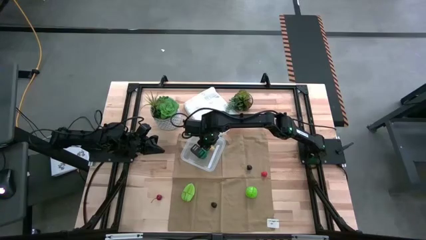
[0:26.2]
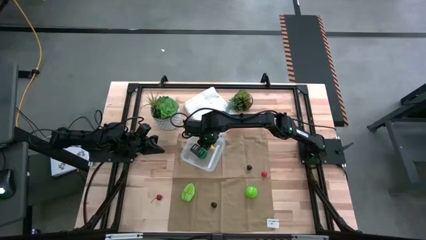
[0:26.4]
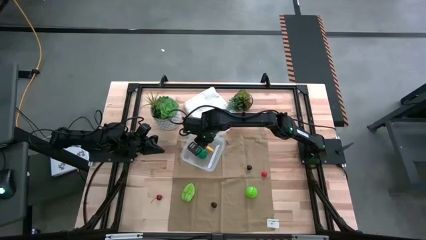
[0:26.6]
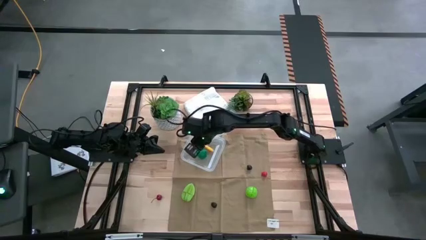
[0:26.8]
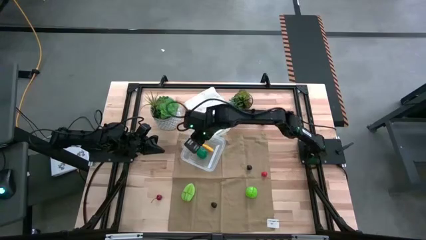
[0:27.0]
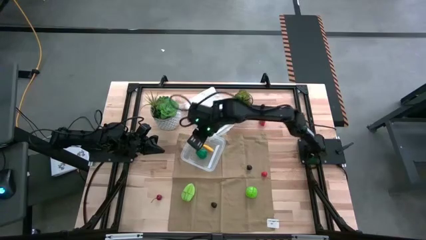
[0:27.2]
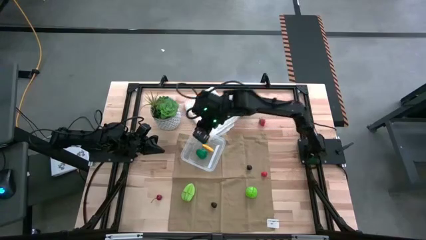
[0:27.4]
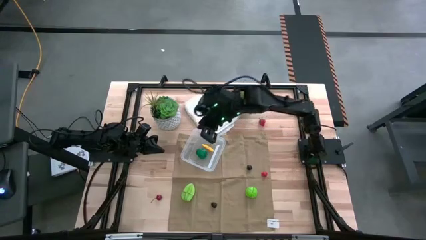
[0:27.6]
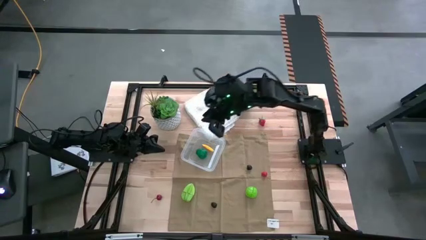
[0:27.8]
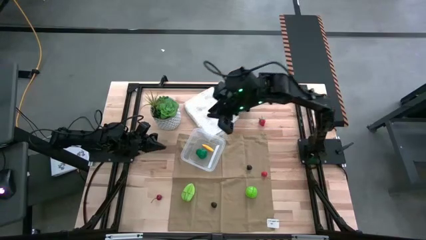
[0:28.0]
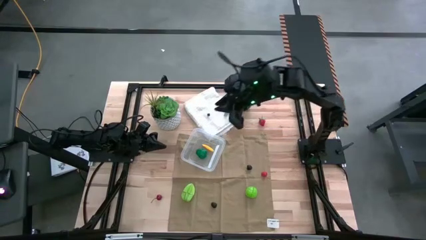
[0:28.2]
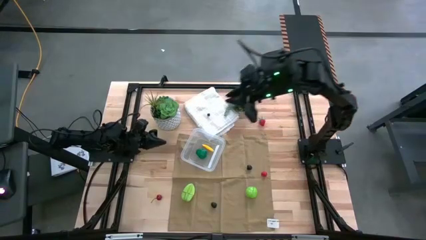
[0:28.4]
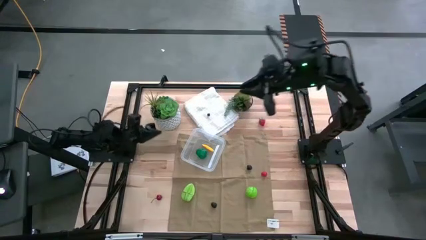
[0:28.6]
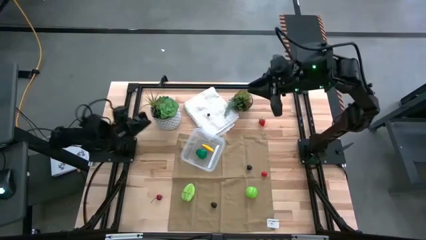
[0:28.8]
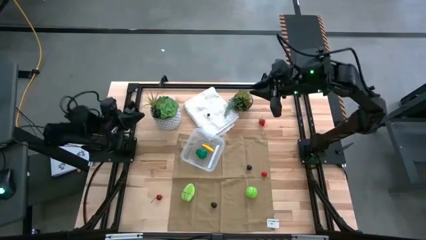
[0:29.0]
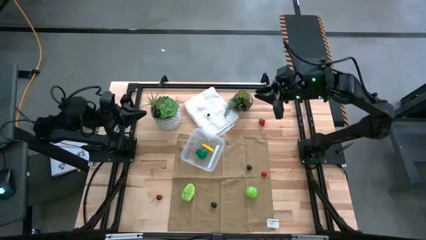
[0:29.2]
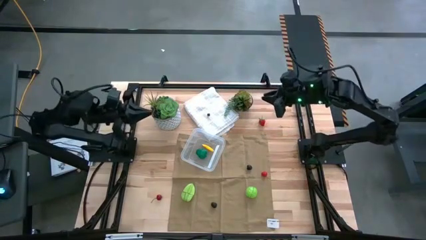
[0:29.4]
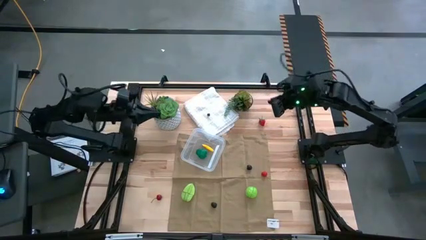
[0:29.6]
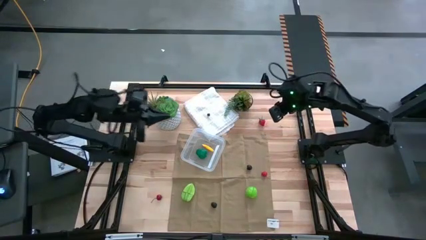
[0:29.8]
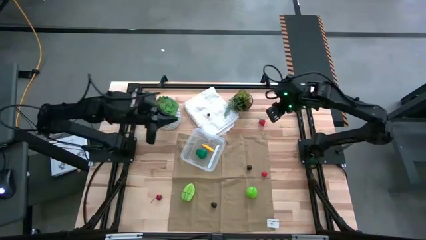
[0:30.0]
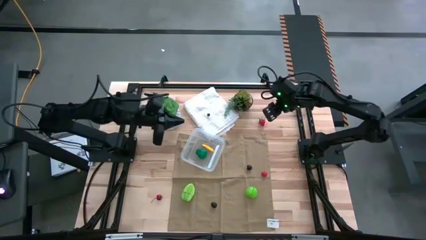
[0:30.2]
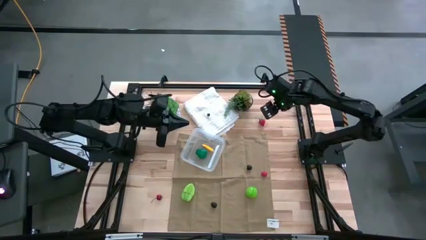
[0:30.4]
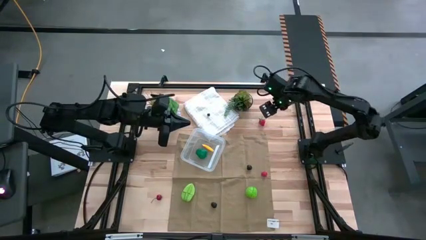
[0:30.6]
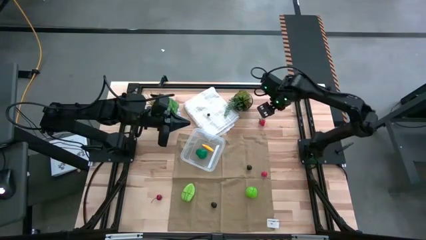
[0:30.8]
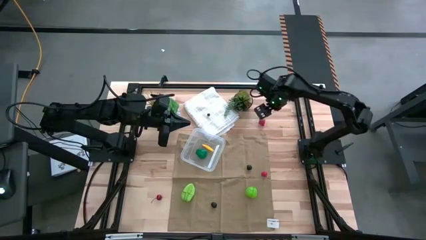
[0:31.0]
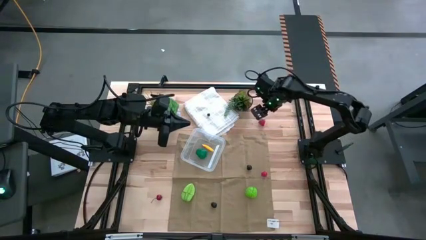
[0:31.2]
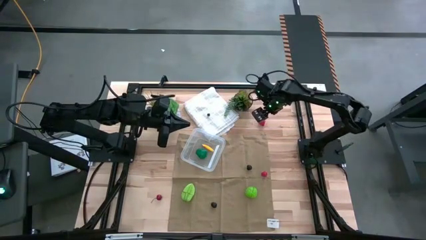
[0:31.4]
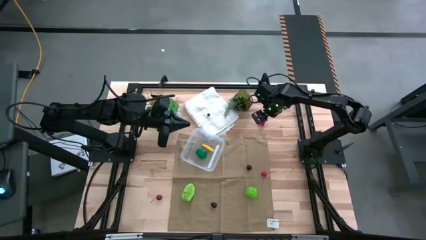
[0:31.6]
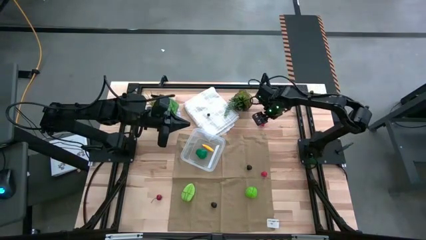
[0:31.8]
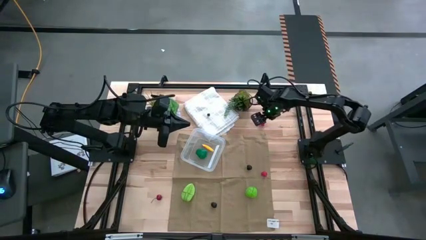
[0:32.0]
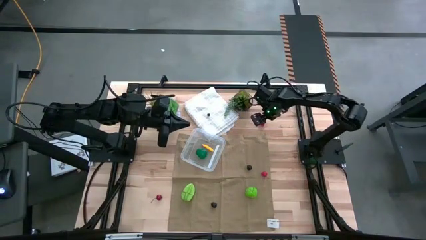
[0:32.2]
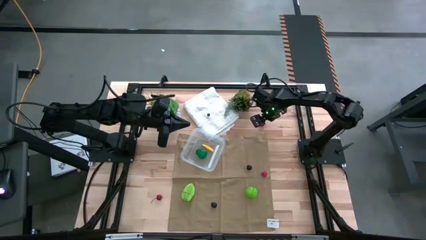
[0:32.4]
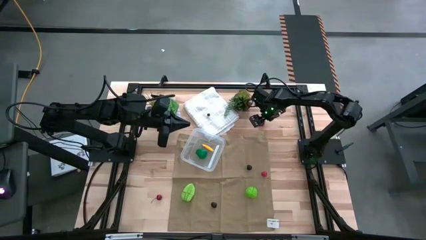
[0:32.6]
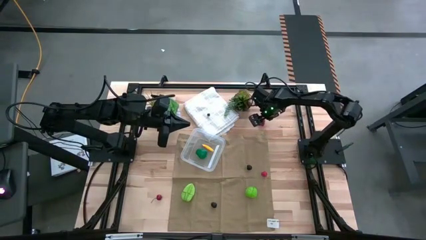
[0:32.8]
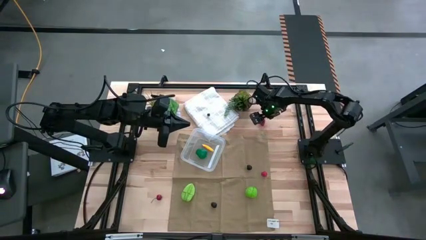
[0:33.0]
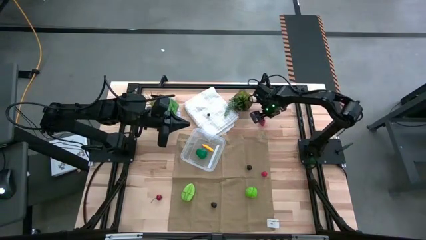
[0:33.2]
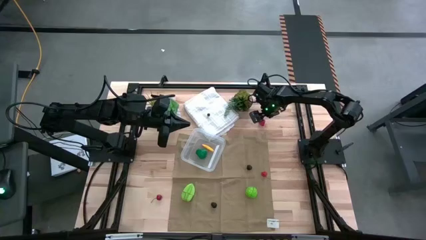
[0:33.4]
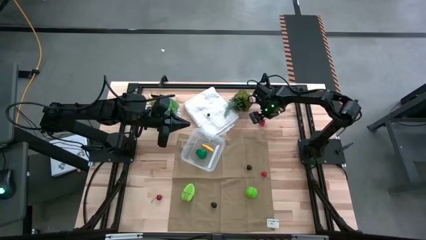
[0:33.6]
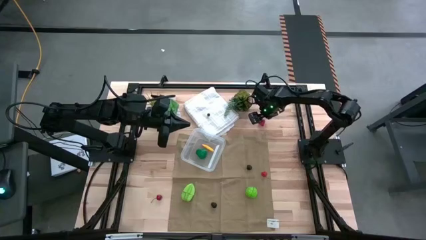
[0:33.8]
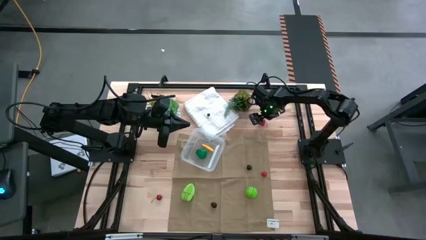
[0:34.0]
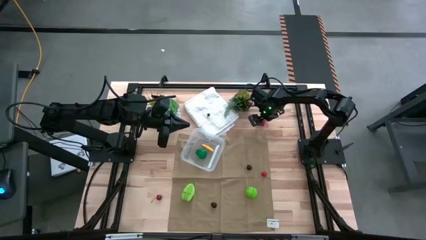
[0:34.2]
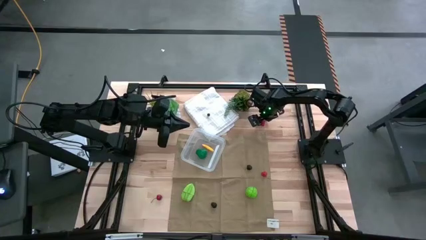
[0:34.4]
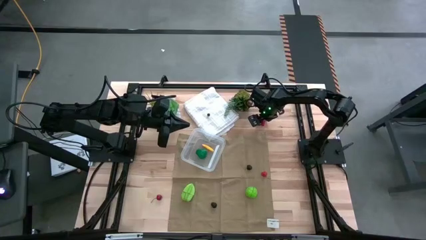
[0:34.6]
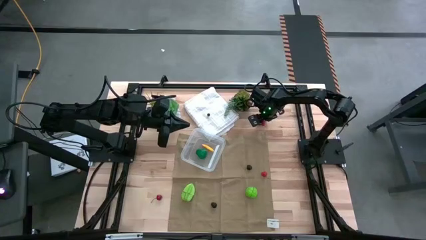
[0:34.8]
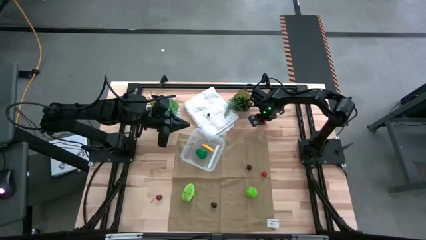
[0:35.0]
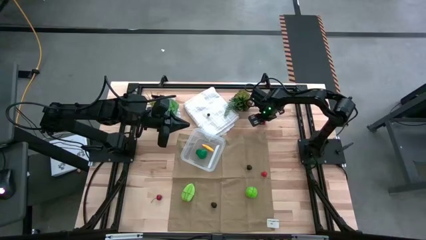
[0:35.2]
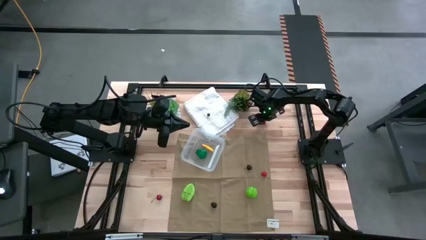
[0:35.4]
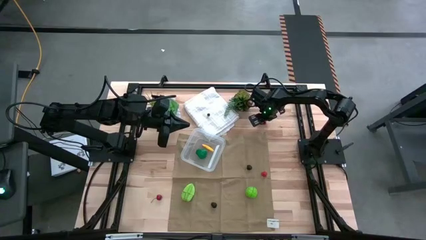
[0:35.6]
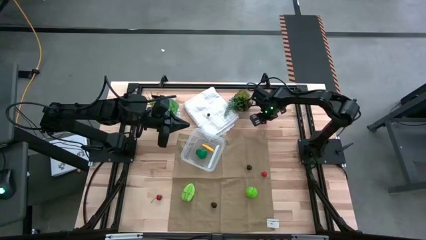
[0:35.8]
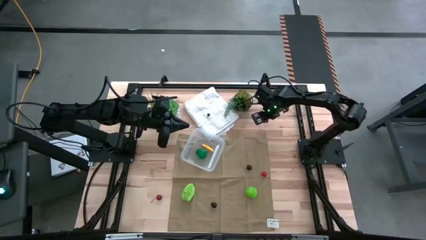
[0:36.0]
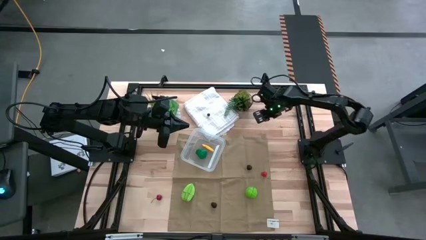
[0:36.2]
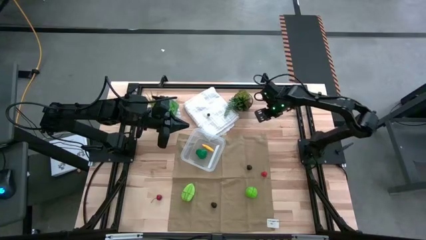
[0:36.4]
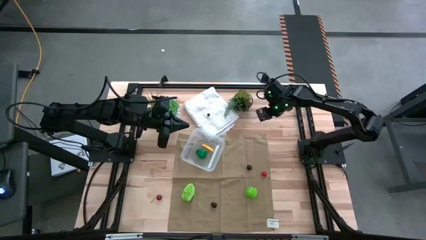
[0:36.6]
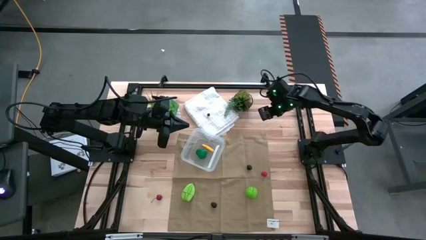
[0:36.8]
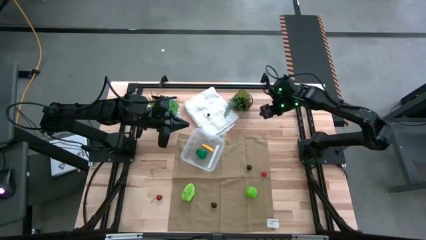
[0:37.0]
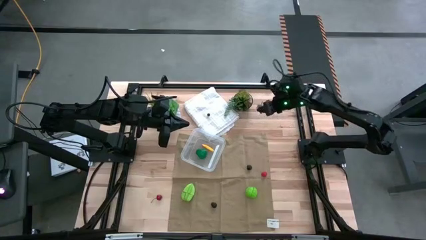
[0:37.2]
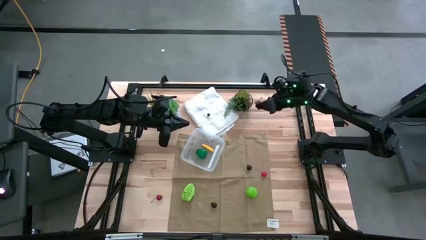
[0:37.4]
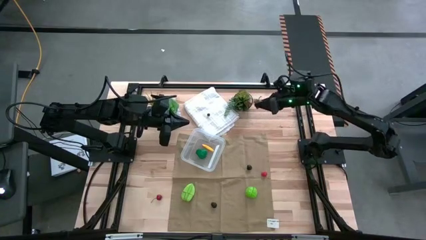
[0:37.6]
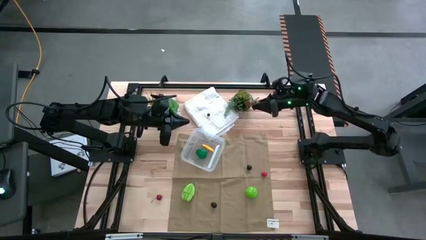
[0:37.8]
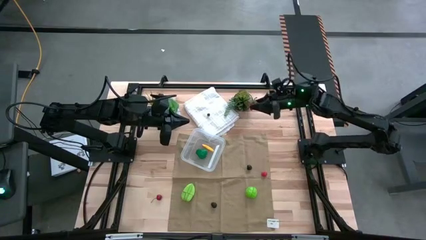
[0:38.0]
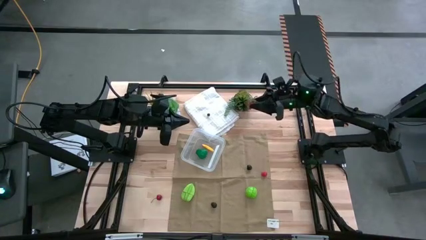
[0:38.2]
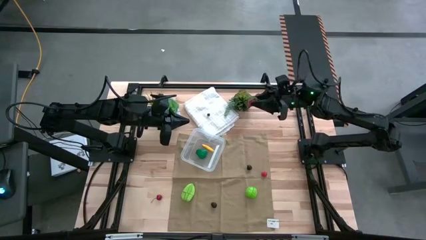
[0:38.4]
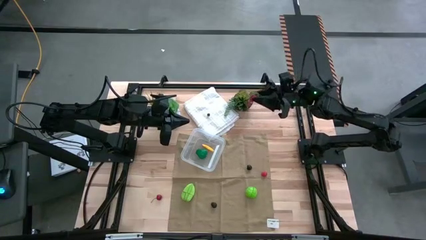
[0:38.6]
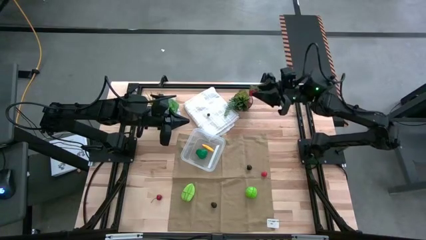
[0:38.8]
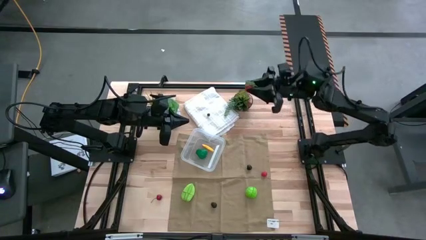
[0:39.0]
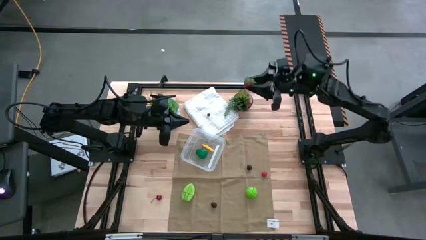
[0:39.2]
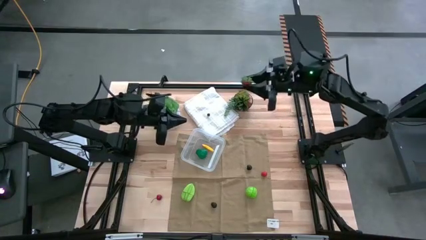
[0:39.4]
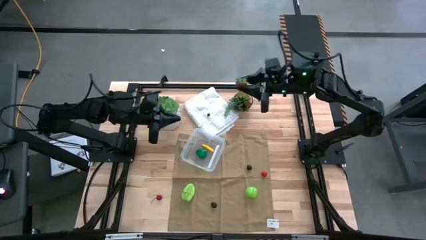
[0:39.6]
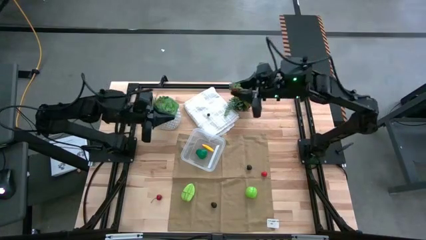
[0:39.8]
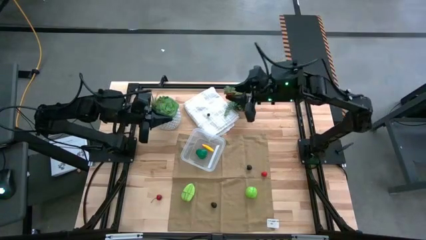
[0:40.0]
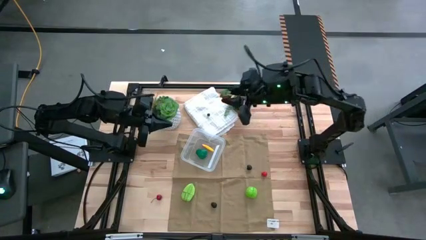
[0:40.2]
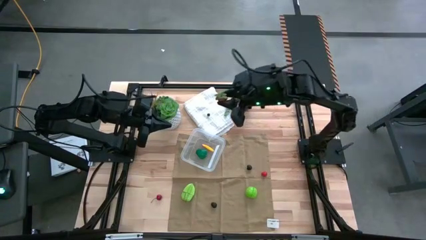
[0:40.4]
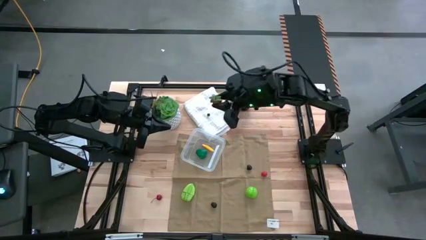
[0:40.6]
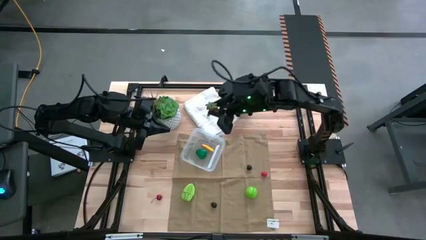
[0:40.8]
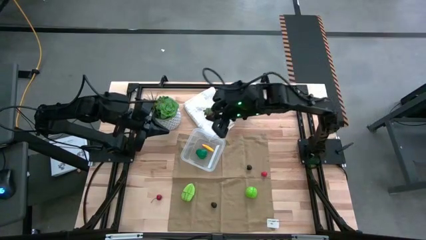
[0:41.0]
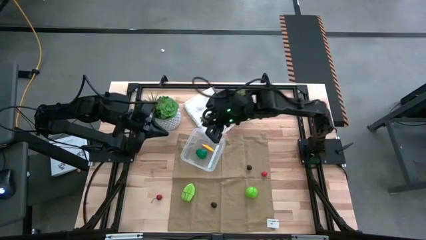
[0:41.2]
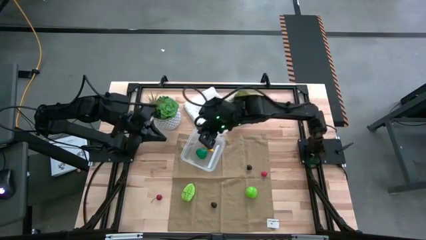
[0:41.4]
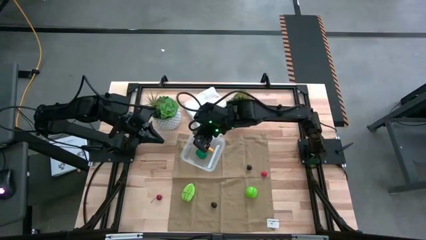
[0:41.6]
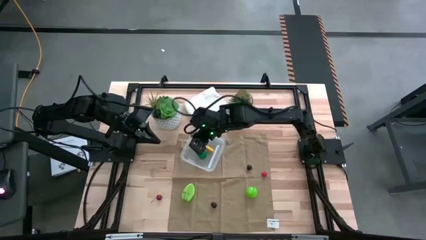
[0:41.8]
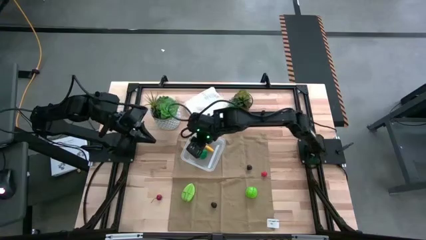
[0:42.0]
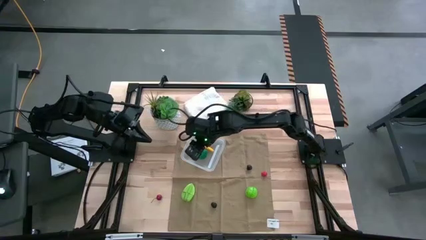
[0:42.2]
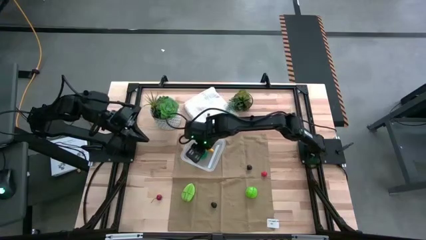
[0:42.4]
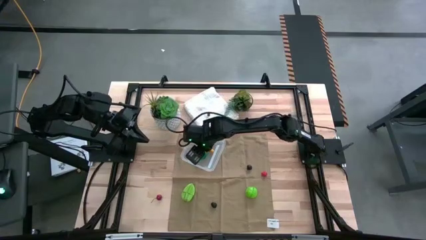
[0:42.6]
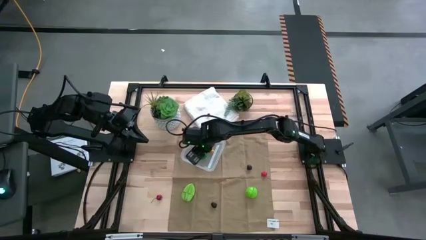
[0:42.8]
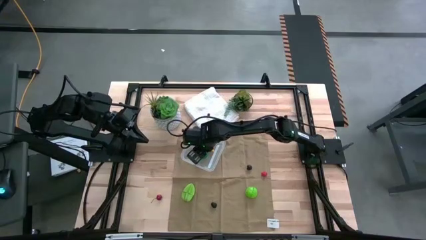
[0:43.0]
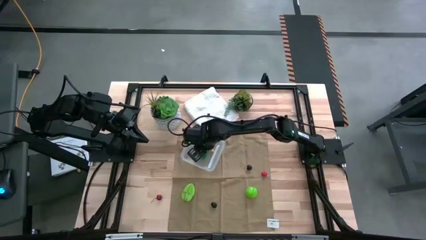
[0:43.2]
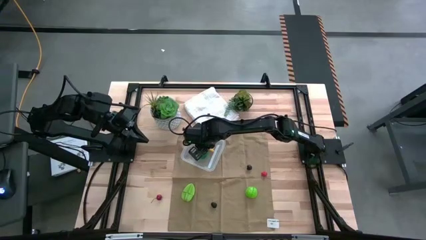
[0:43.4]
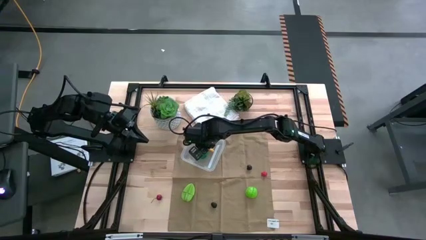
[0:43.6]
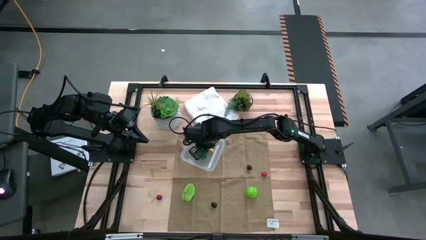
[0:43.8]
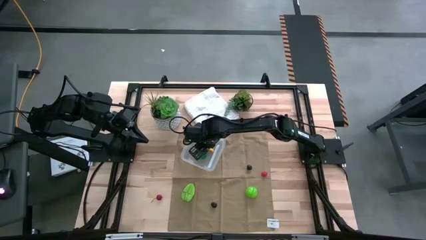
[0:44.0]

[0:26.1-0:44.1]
Task: Pick and placing Produce into tupperware
Put the red strawberry into transparent bin
